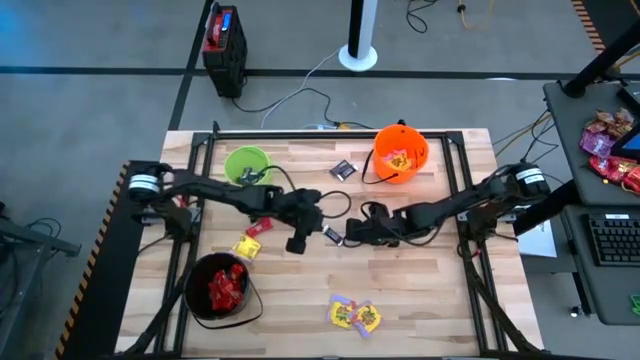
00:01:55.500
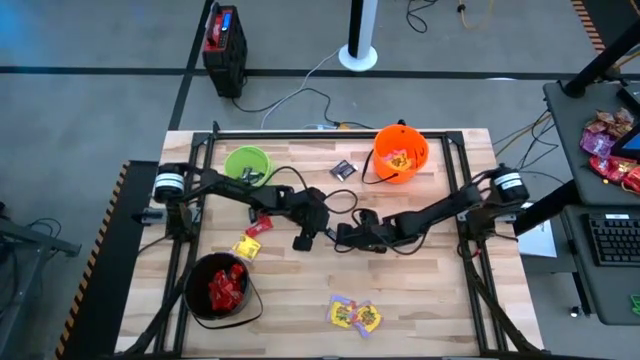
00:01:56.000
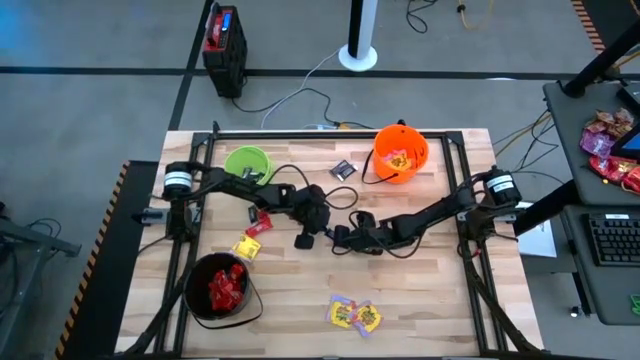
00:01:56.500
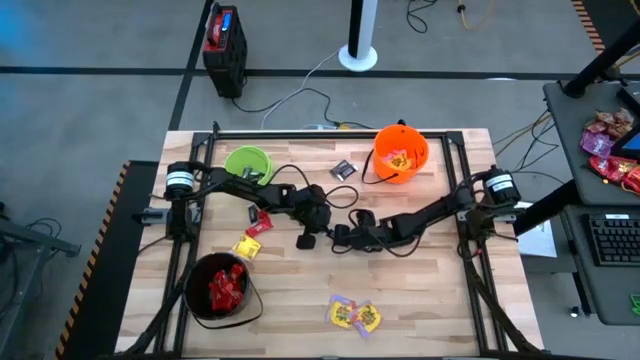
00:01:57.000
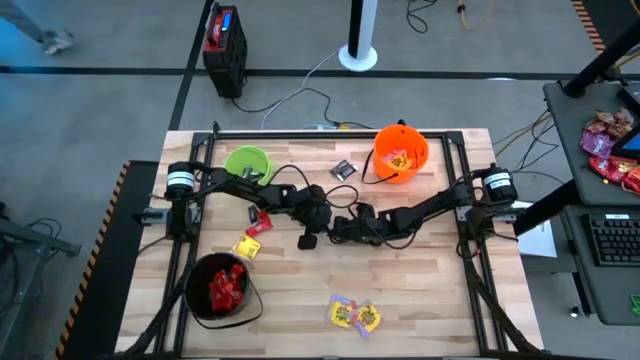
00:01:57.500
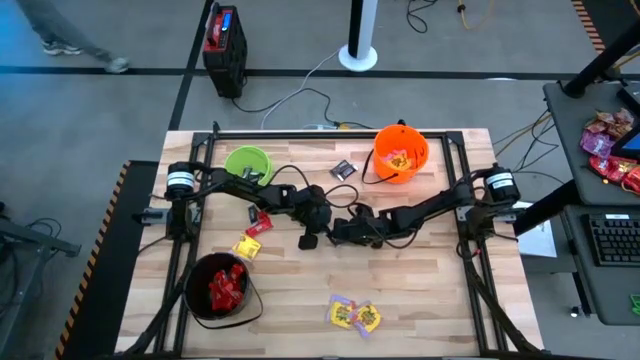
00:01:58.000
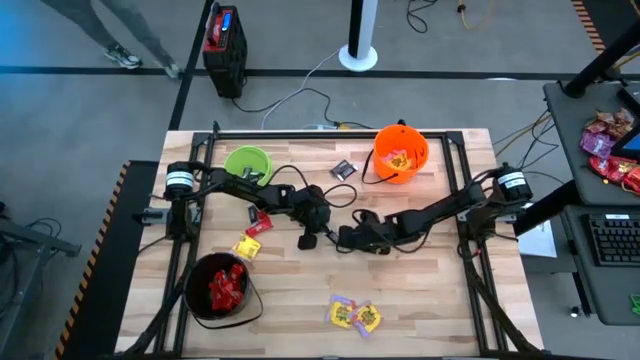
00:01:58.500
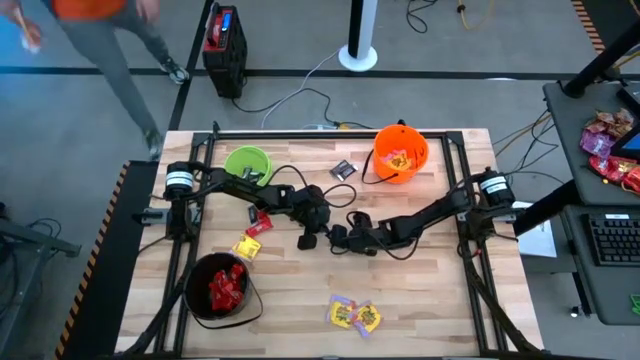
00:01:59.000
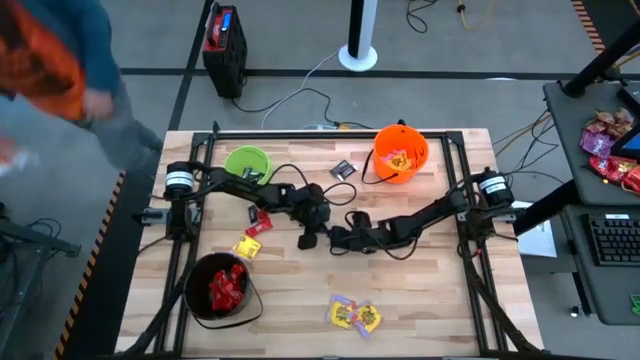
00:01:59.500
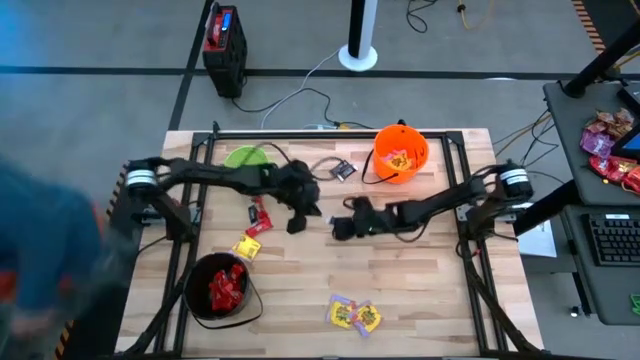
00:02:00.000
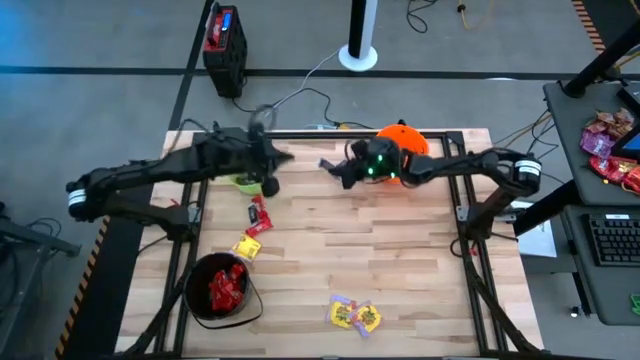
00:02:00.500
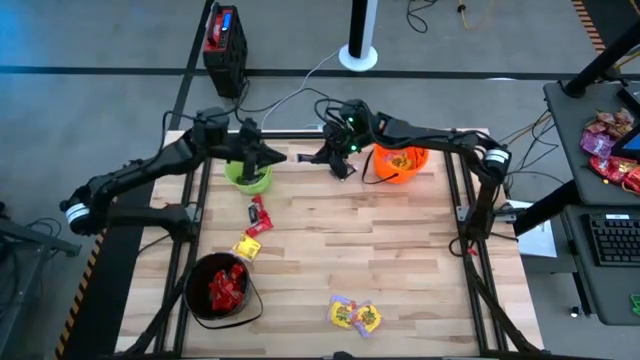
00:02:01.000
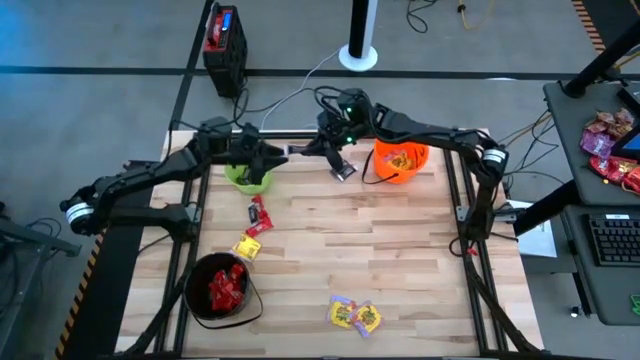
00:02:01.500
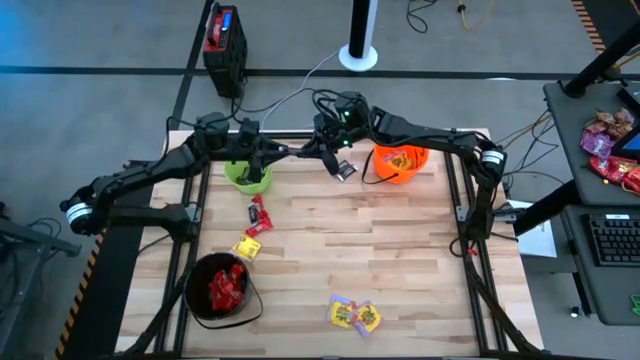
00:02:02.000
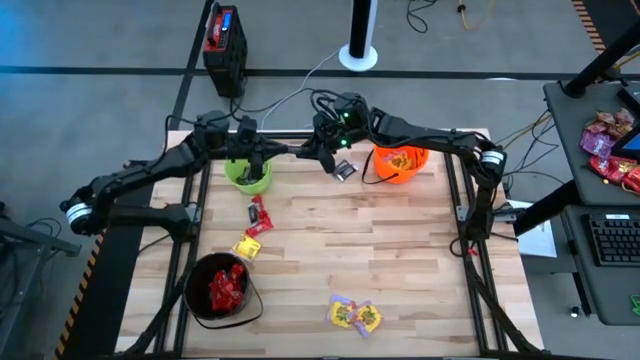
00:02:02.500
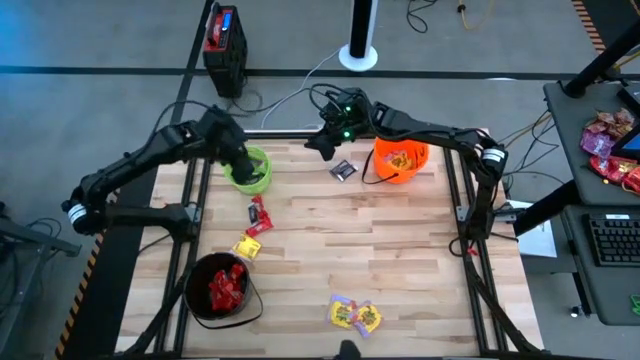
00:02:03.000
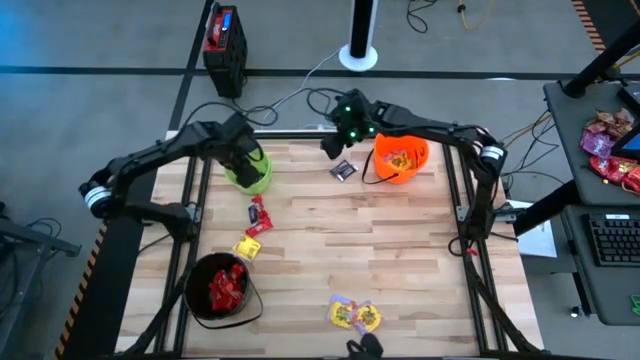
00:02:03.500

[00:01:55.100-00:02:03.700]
Task: Sort candy by brand, put in halloween buckets
Put the brown candy into the green bucket

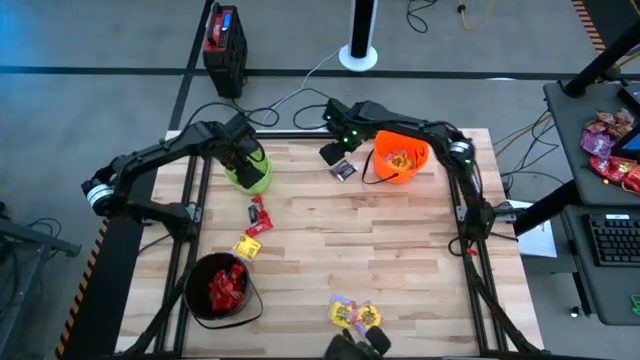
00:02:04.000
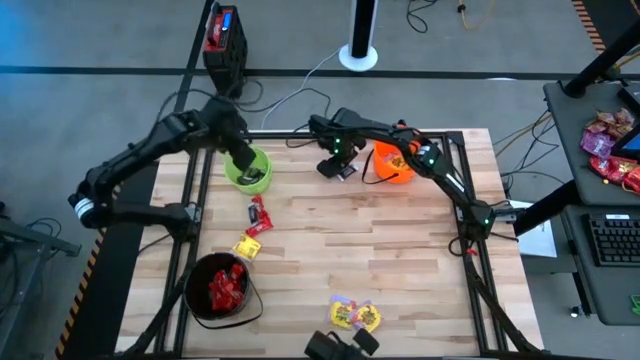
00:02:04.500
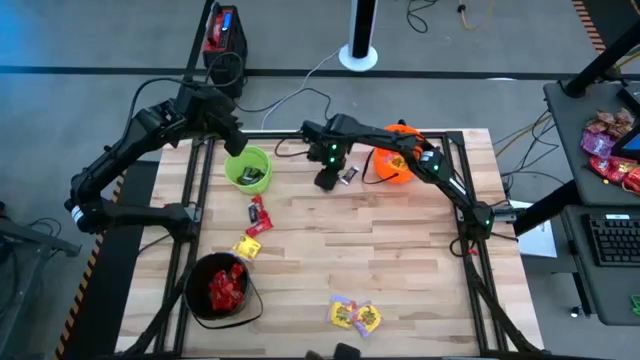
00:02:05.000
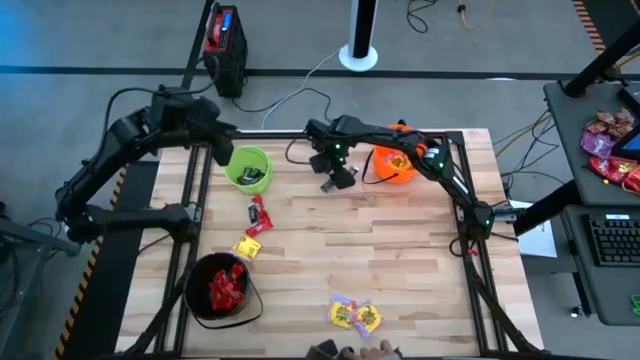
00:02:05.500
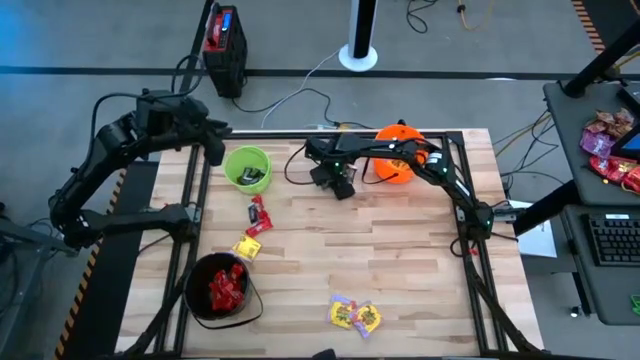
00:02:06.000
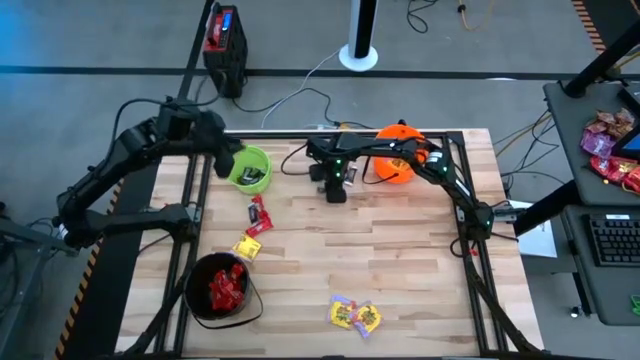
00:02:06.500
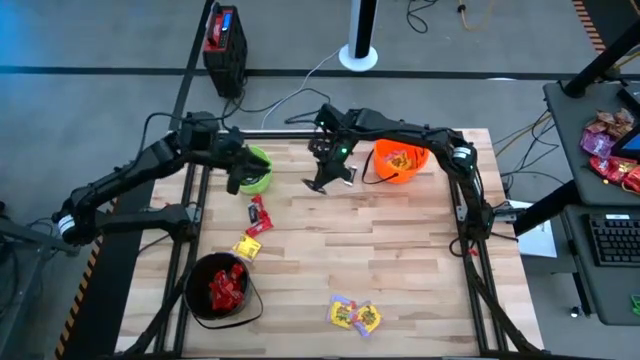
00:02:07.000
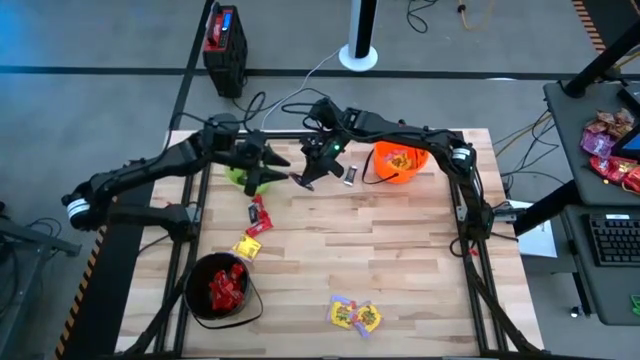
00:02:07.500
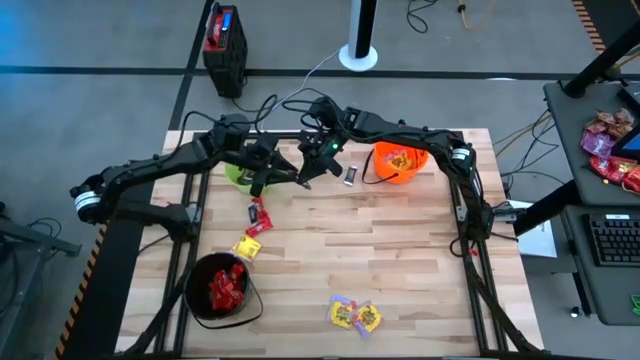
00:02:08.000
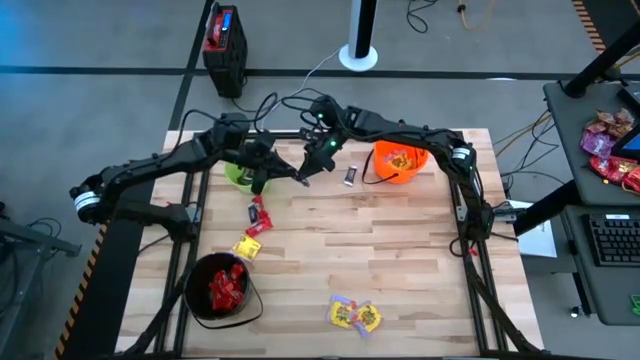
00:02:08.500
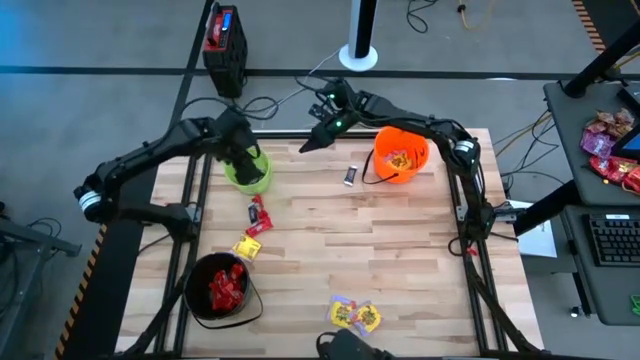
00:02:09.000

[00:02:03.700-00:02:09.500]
Put the brown candy into the green bucket

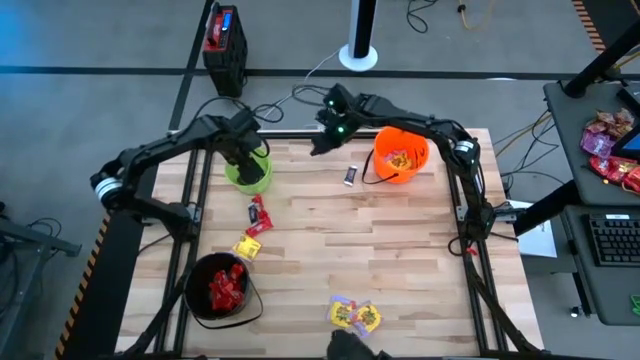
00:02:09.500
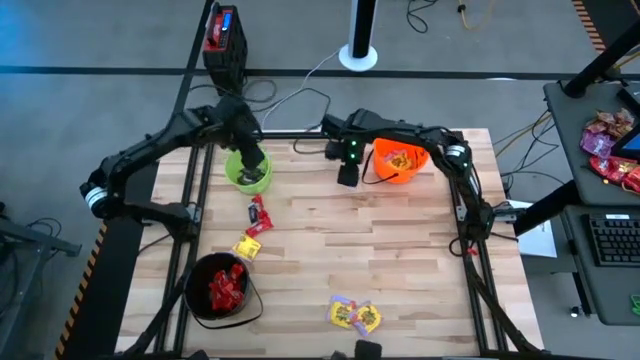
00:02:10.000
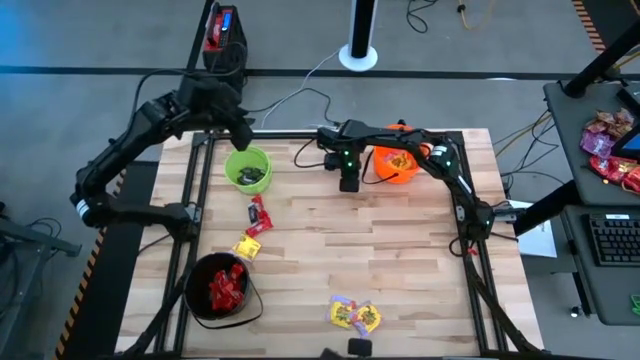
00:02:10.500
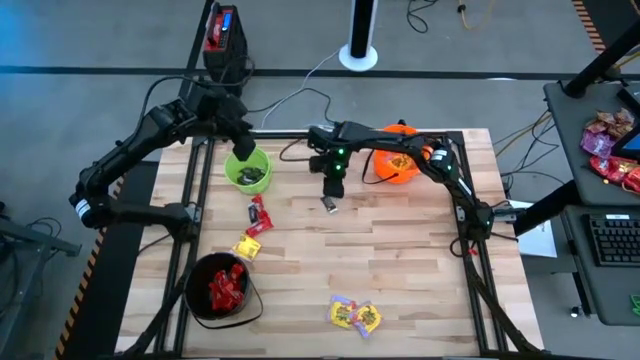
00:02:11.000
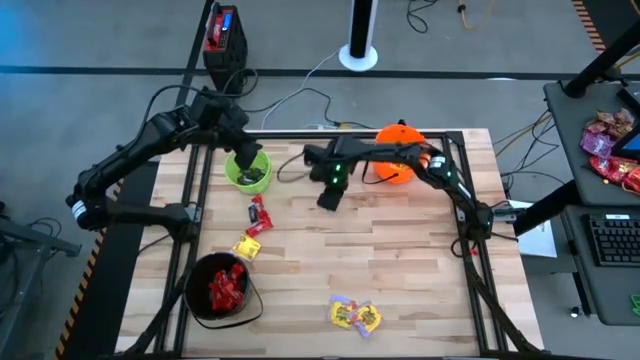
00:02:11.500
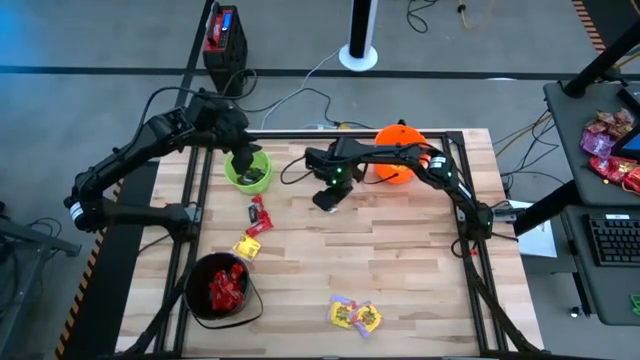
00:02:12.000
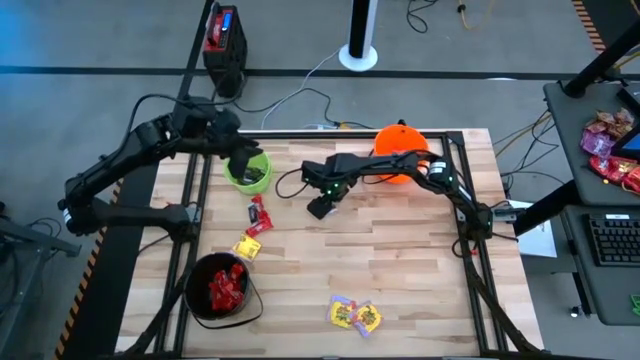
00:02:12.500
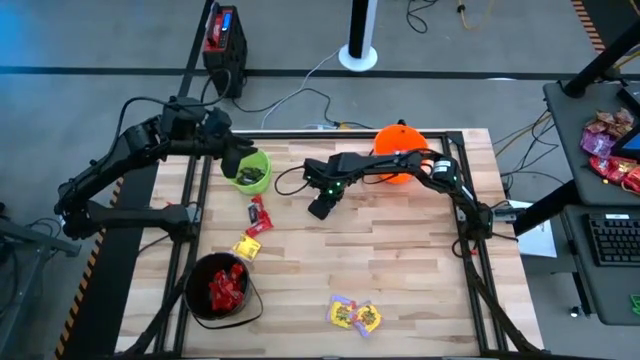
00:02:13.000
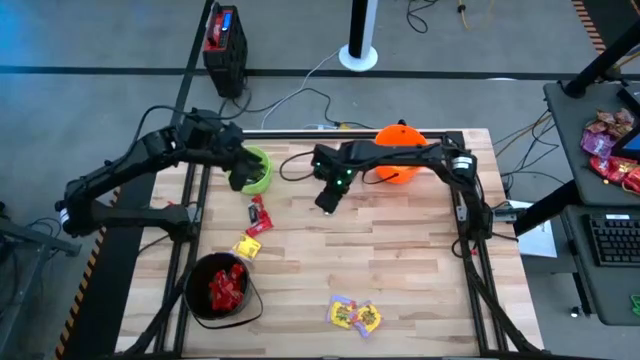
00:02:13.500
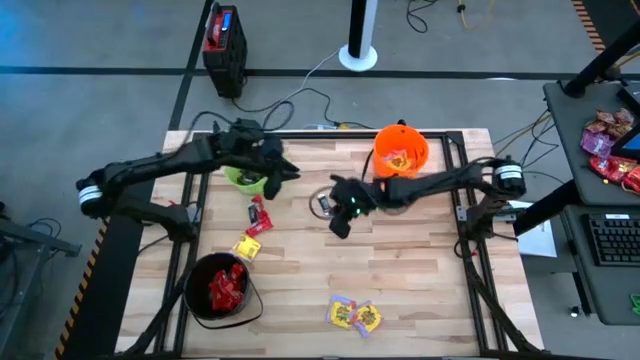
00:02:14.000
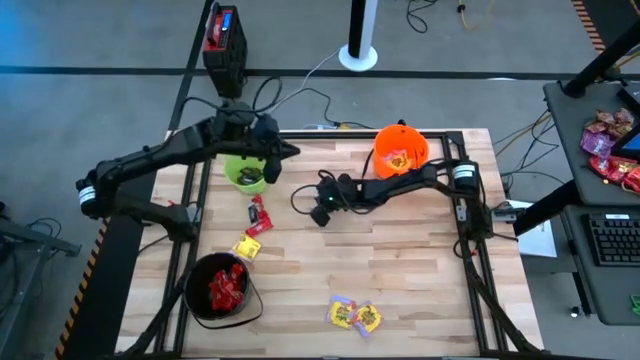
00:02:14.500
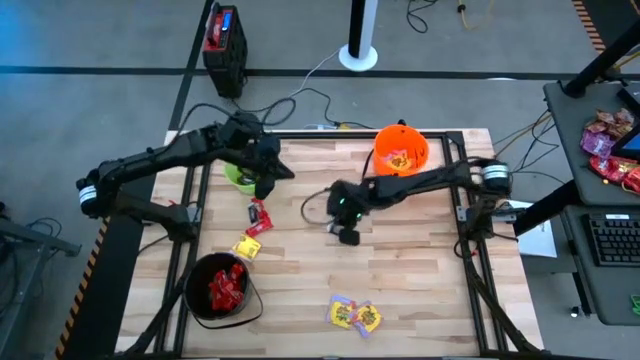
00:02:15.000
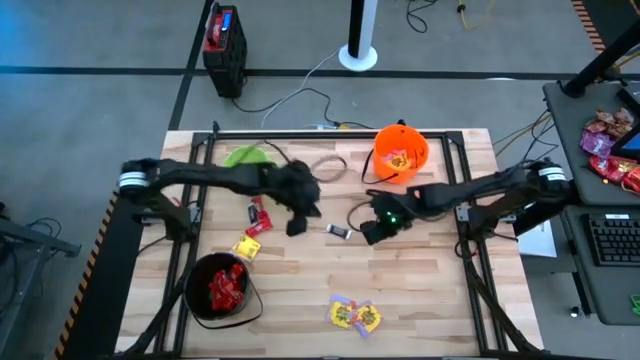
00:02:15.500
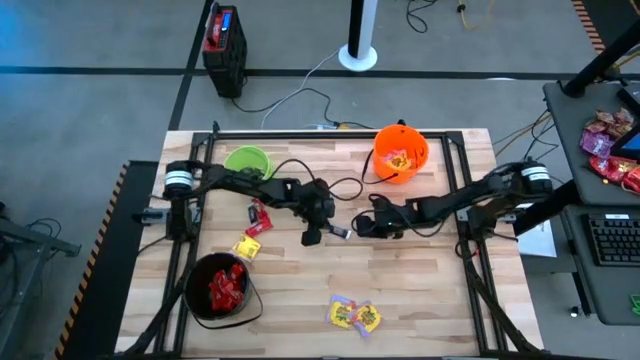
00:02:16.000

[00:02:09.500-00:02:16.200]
Put the brown candy into the green bucket
